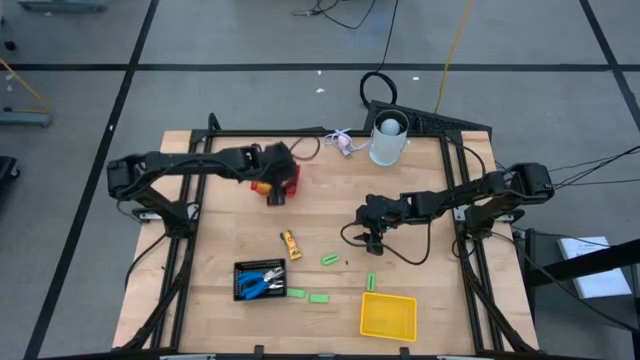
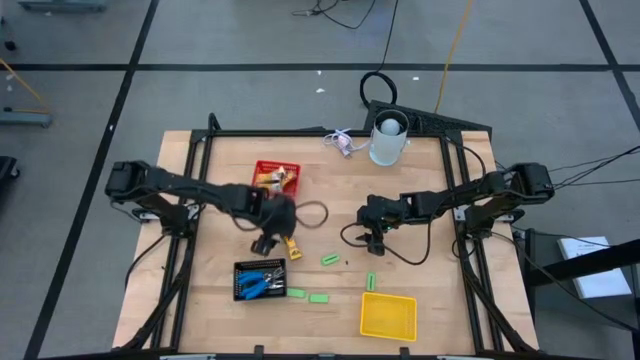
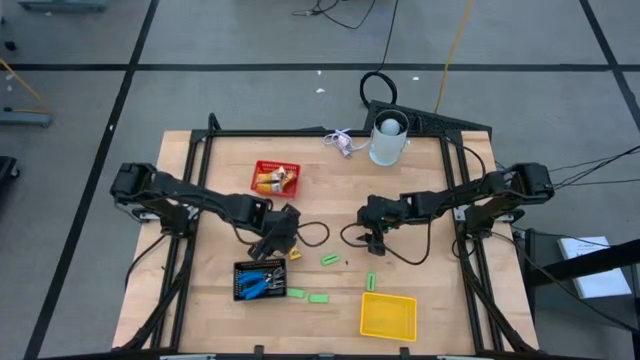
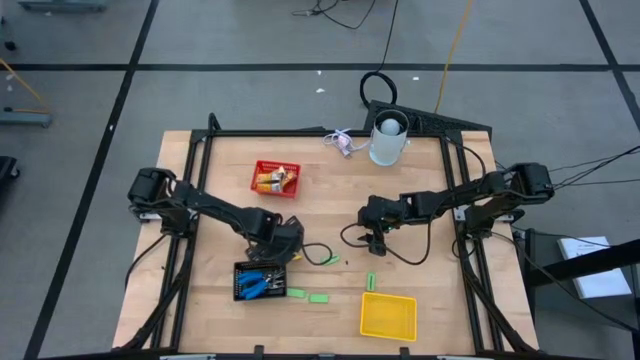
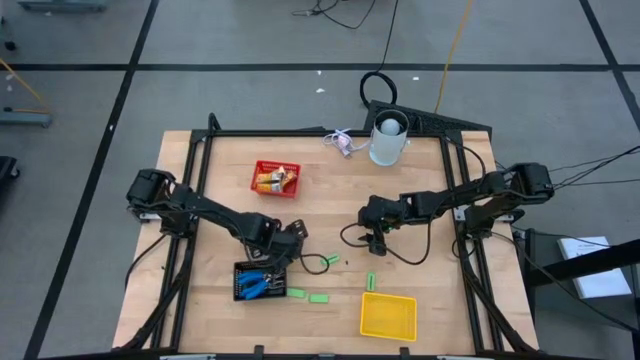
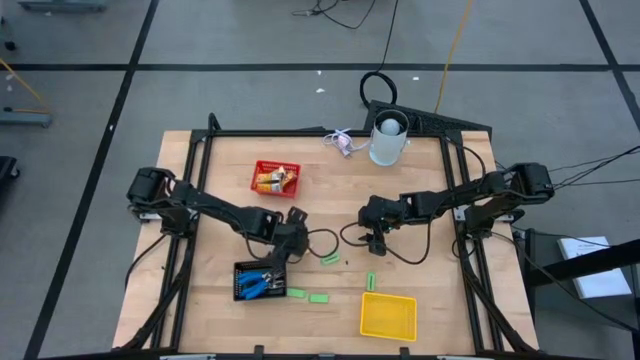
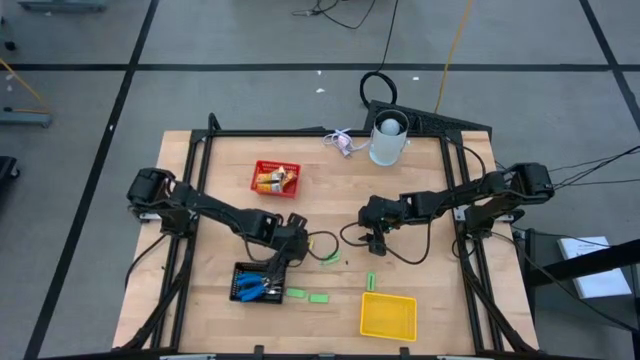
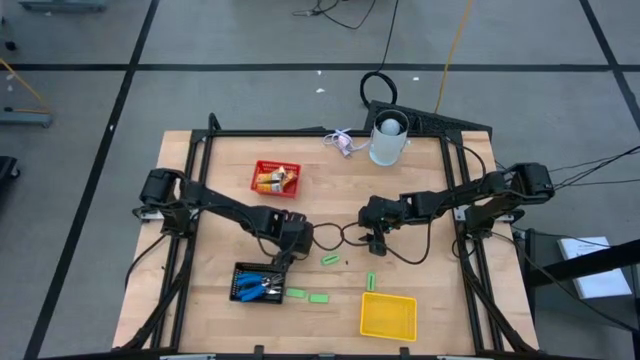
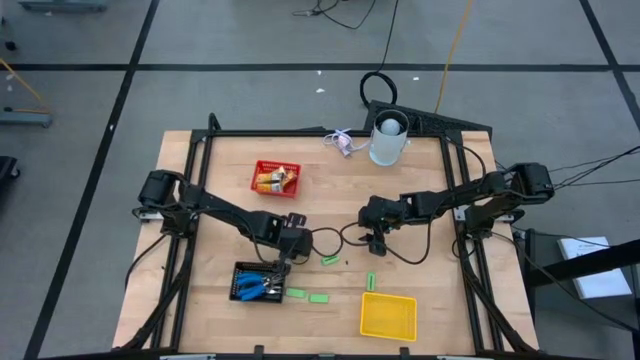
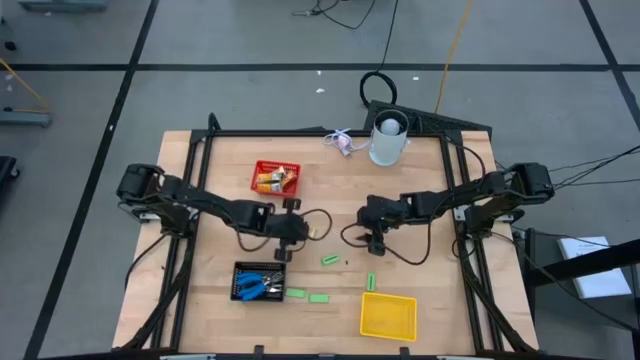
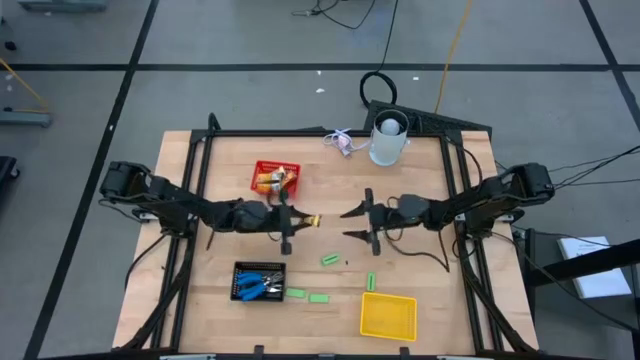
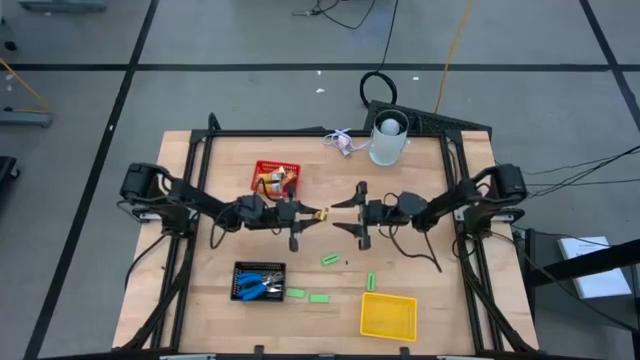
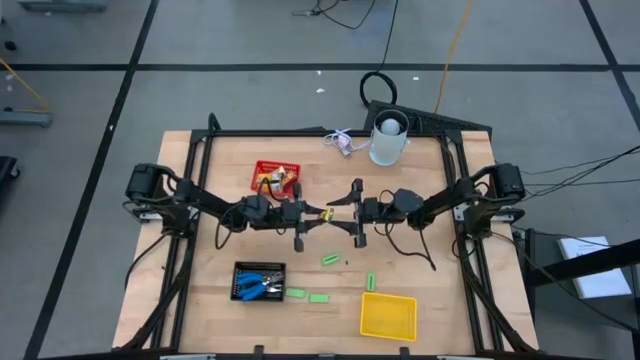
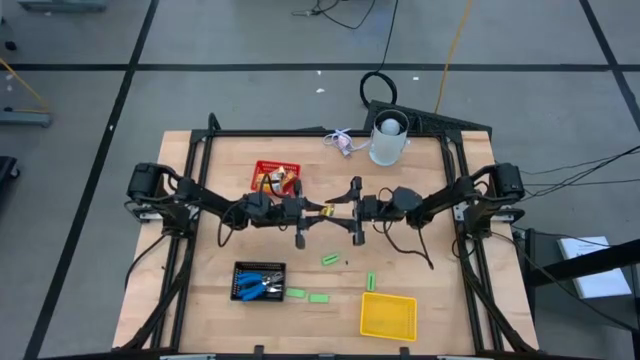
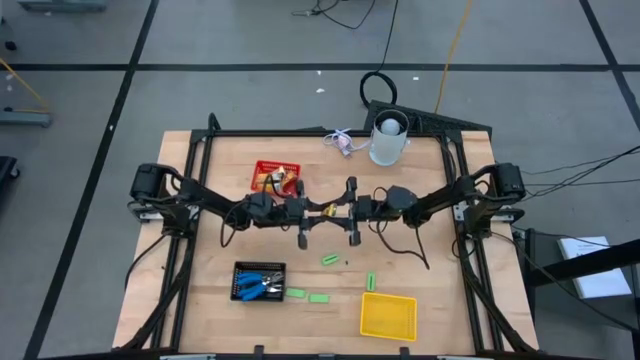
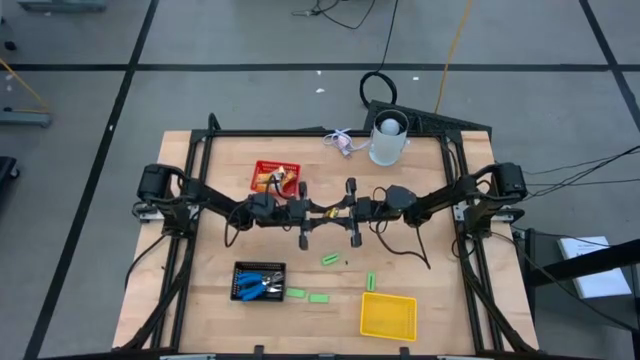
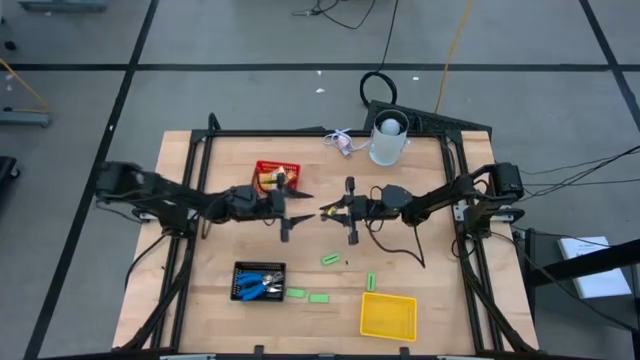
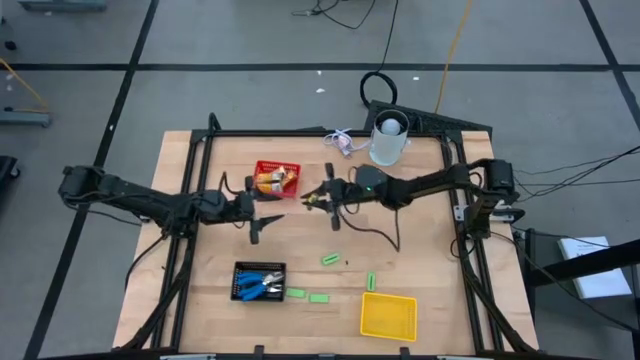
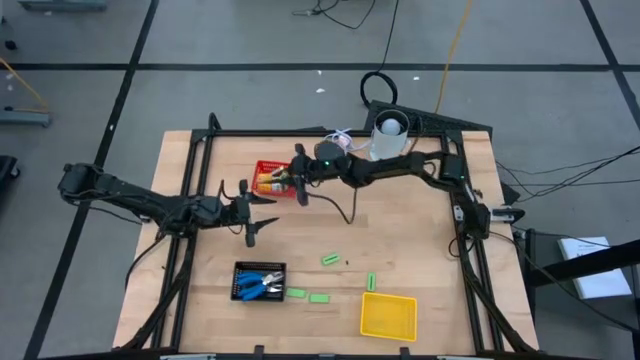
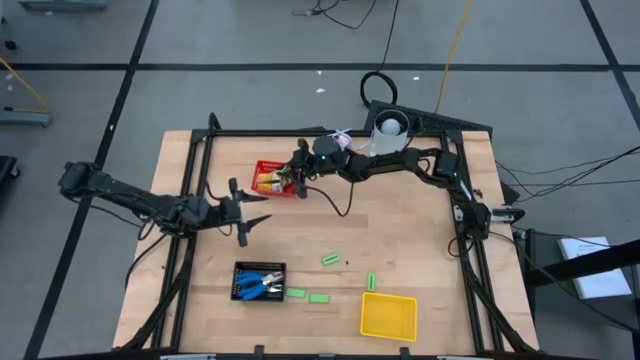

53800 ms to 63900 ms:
Task: Pick & Place School Supplies
Put the crayon box into the red bin

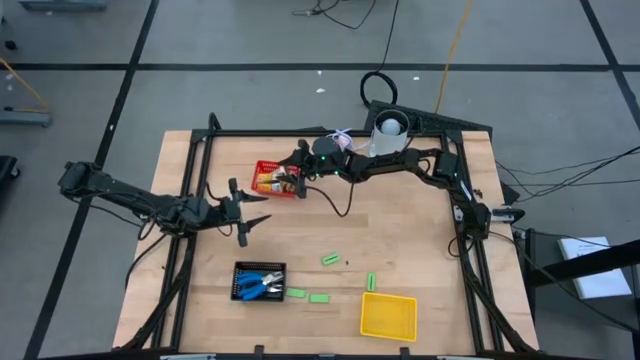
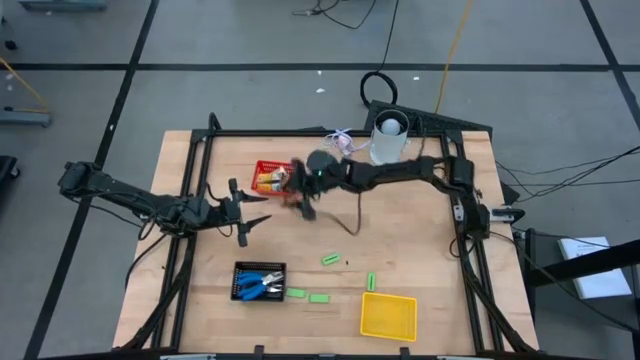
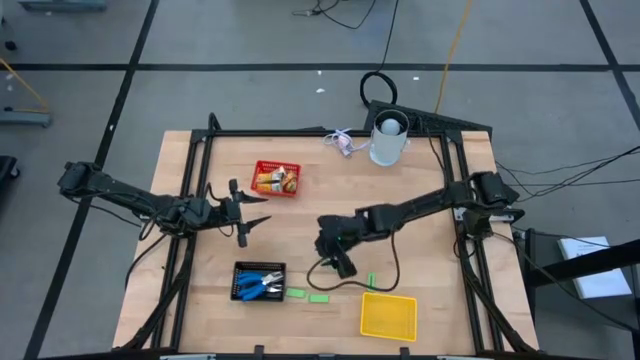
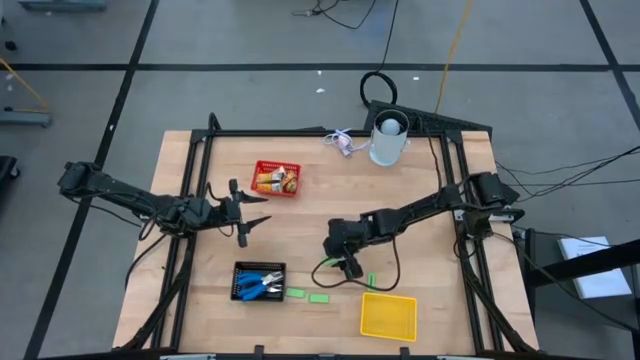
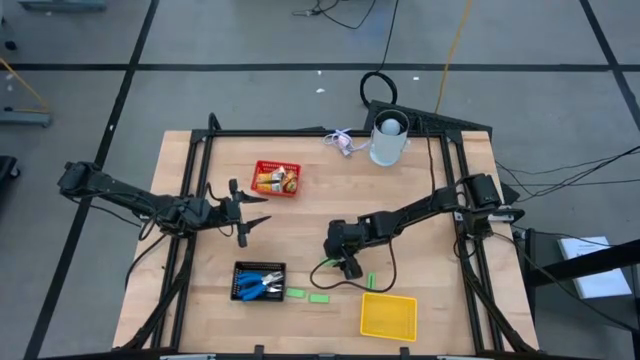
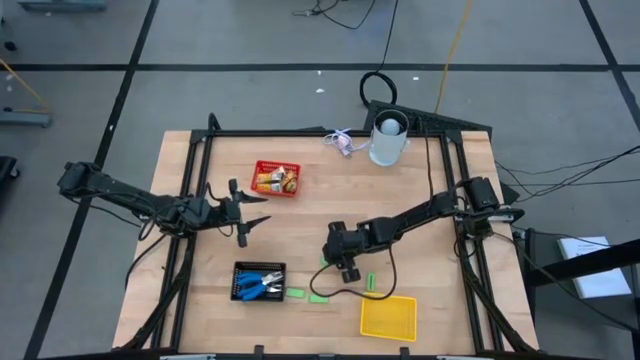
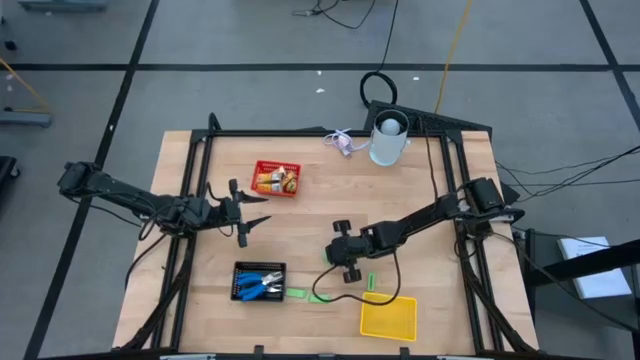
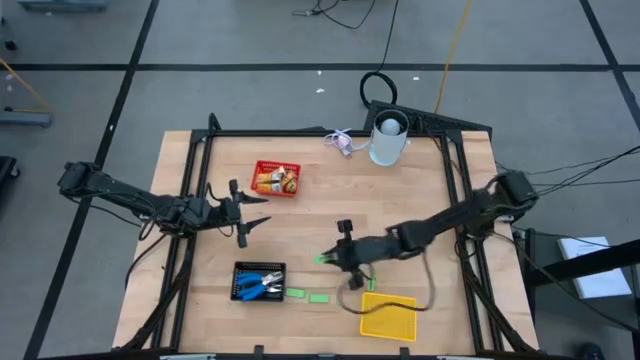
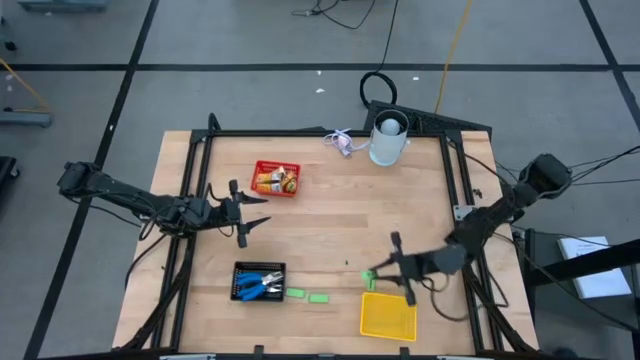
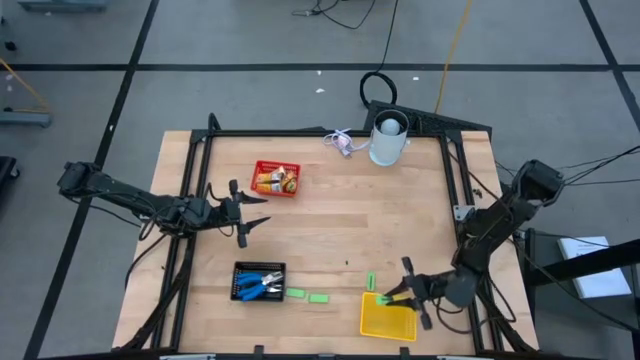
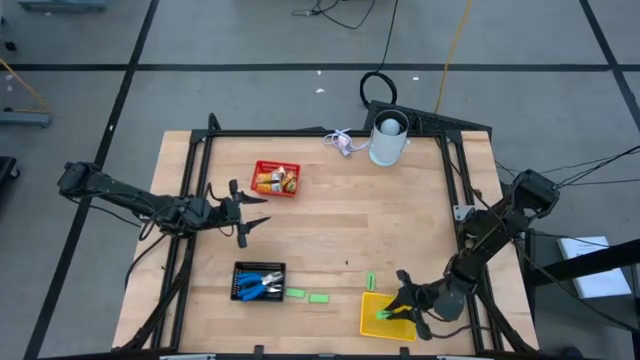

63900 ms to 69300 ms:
Put the green eraser into the yellow bin

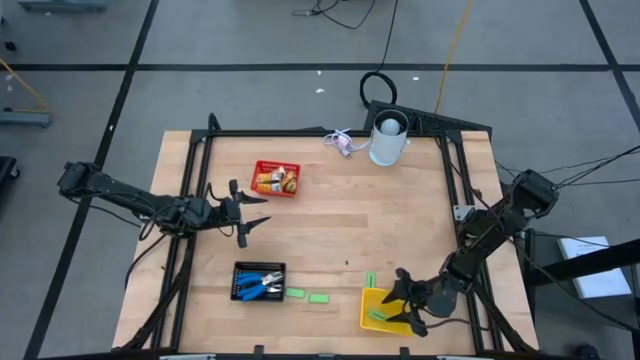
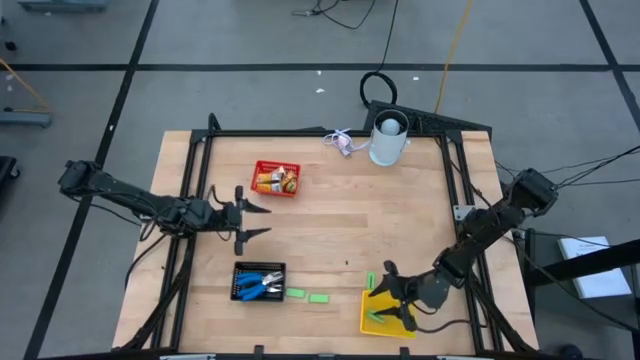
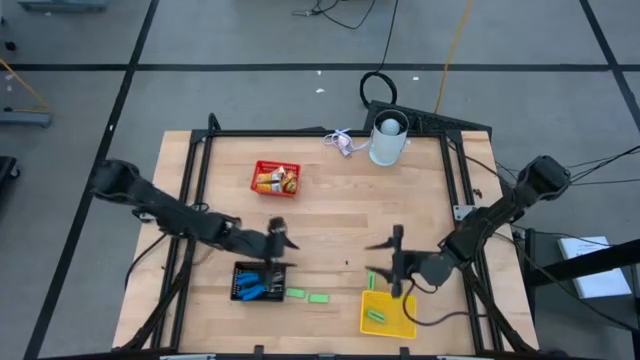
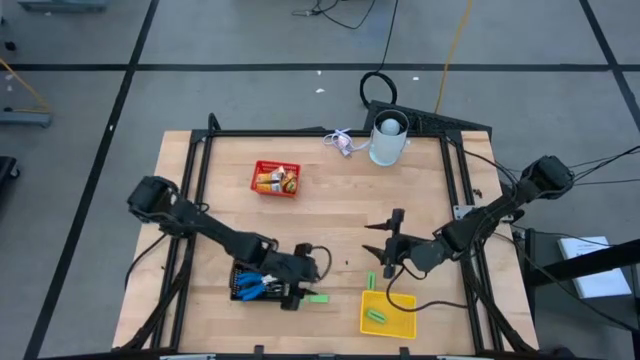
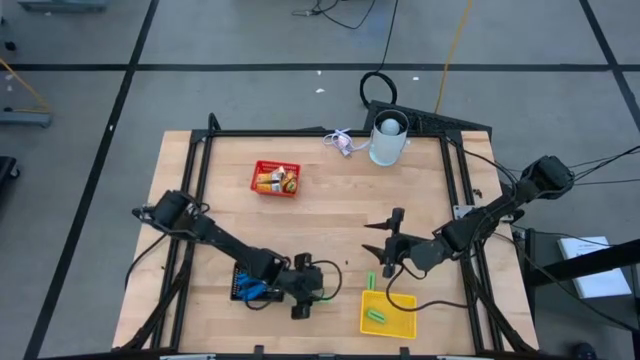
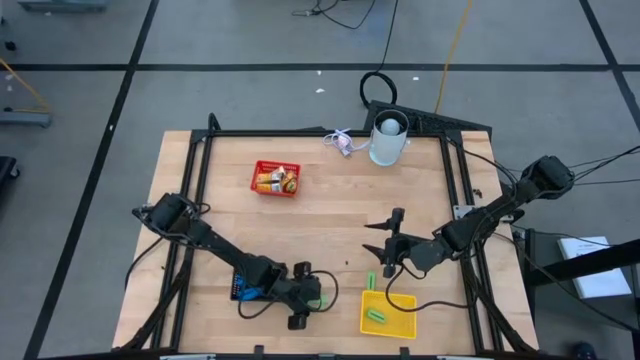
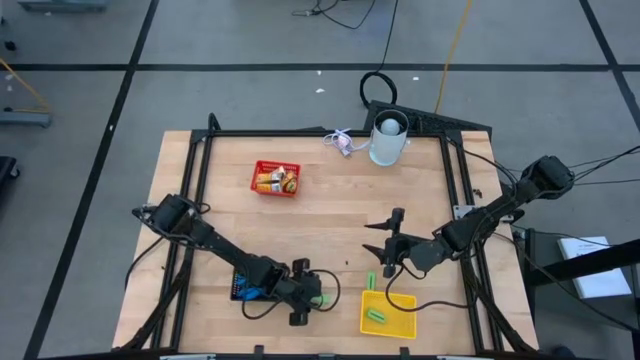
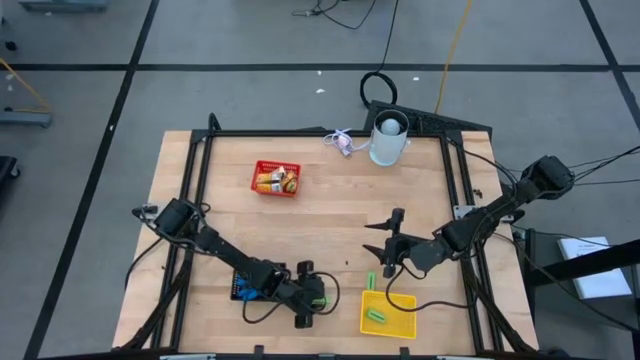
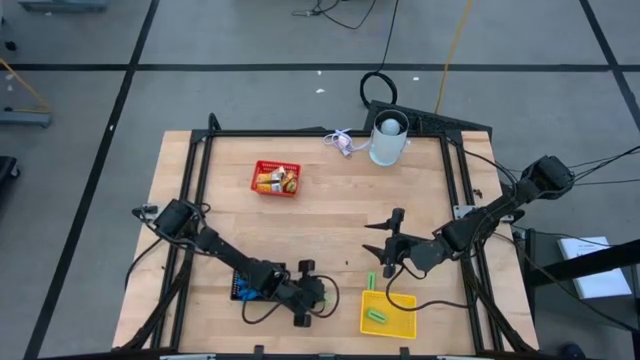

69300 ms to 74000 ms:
Put the green eraser into the yellow bin
